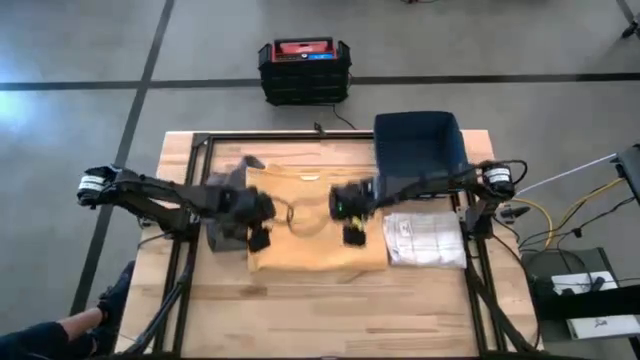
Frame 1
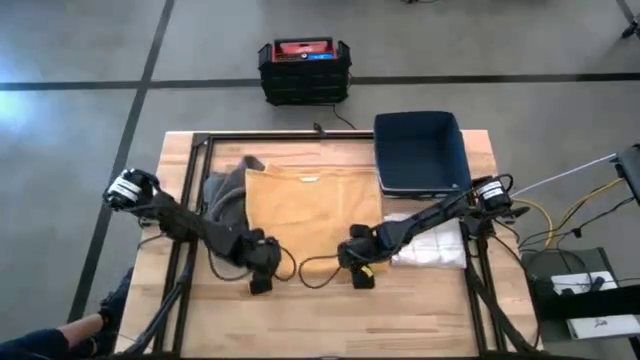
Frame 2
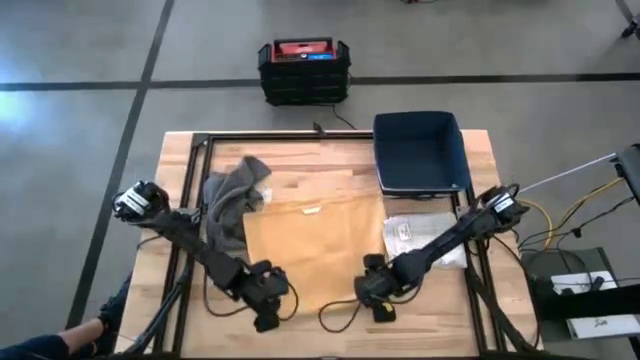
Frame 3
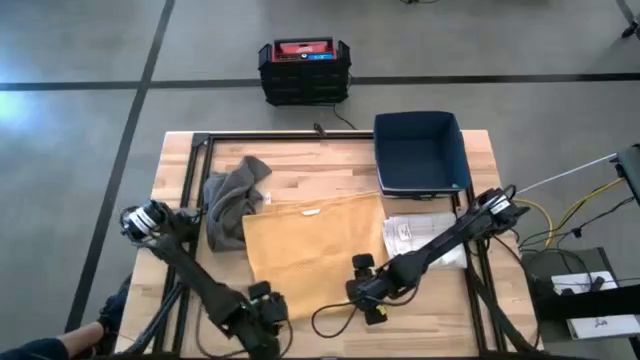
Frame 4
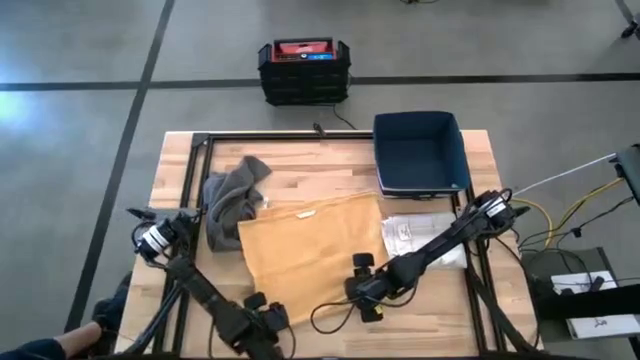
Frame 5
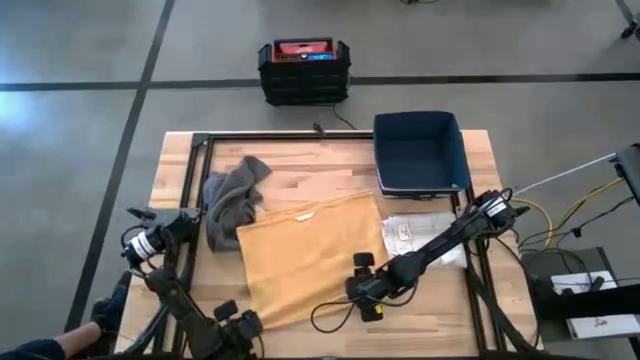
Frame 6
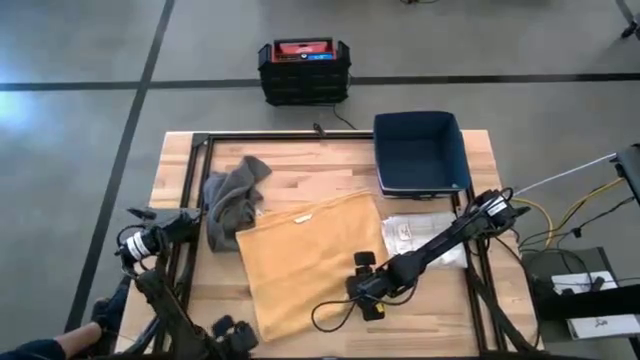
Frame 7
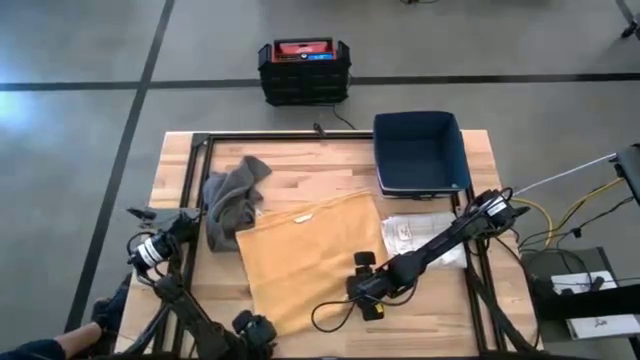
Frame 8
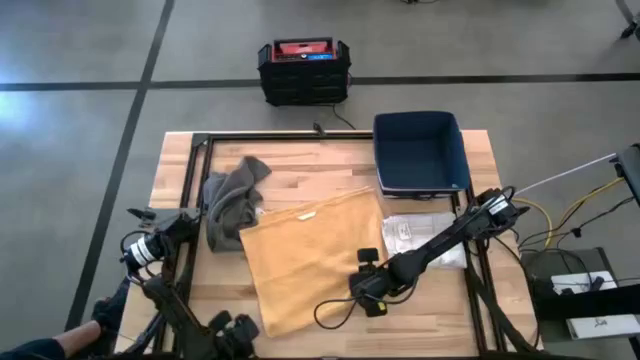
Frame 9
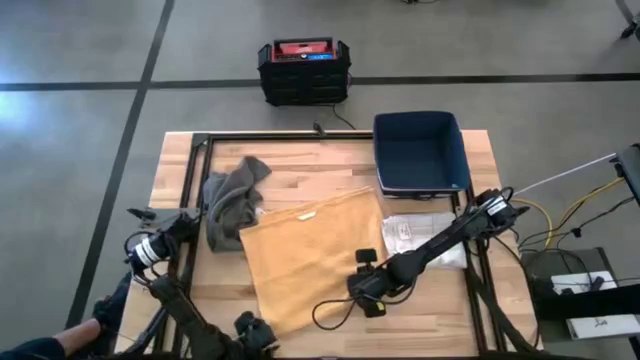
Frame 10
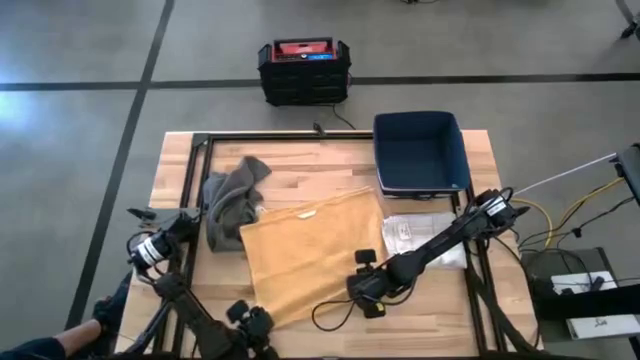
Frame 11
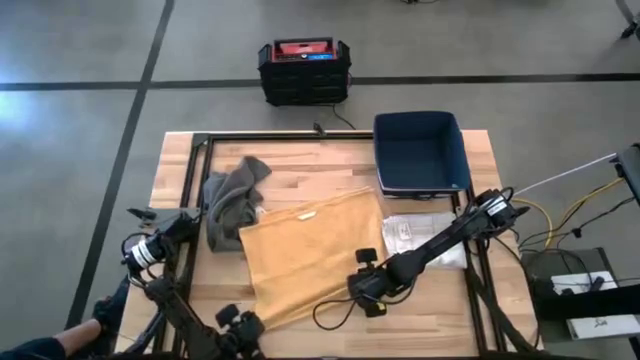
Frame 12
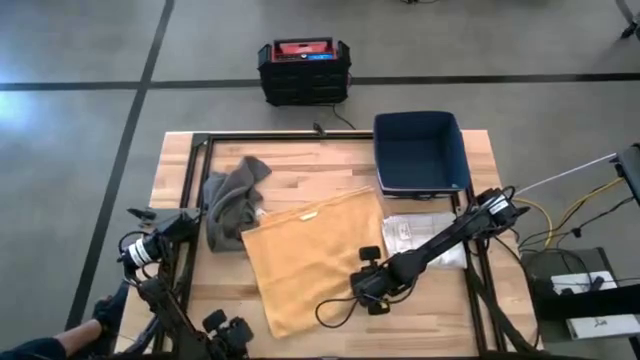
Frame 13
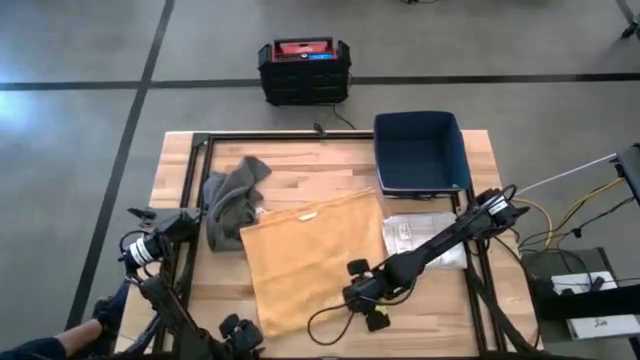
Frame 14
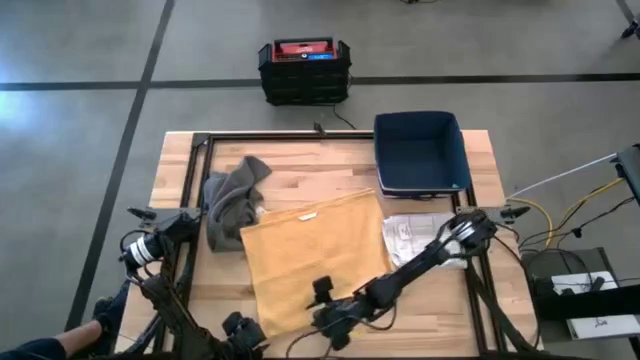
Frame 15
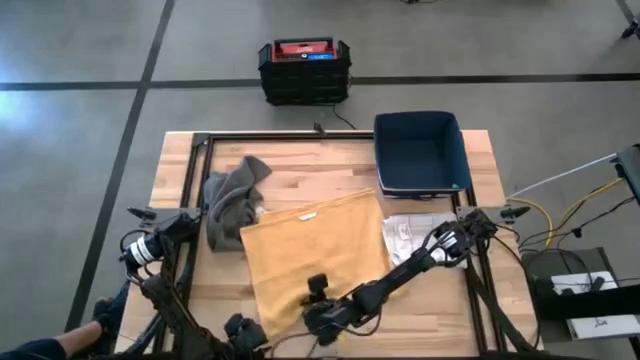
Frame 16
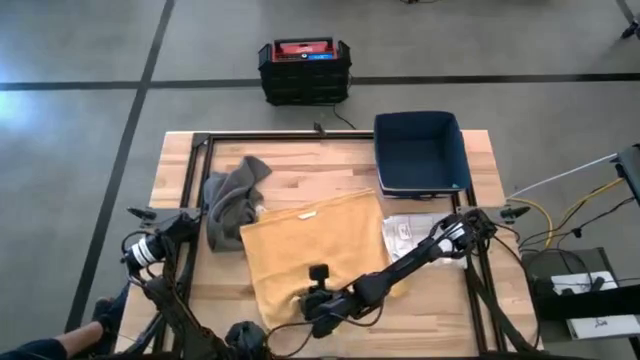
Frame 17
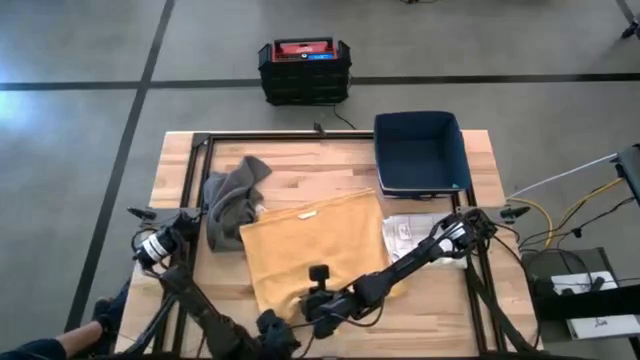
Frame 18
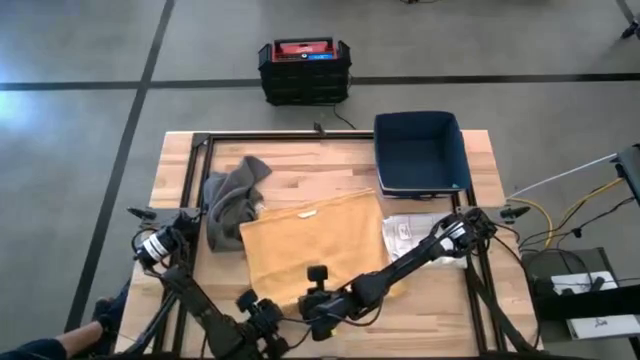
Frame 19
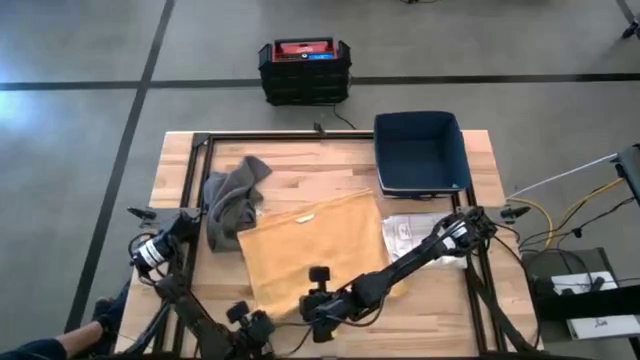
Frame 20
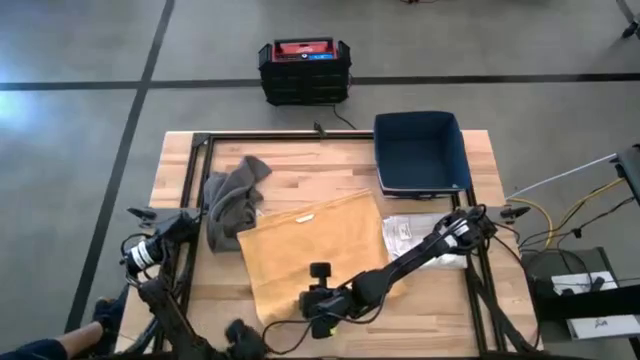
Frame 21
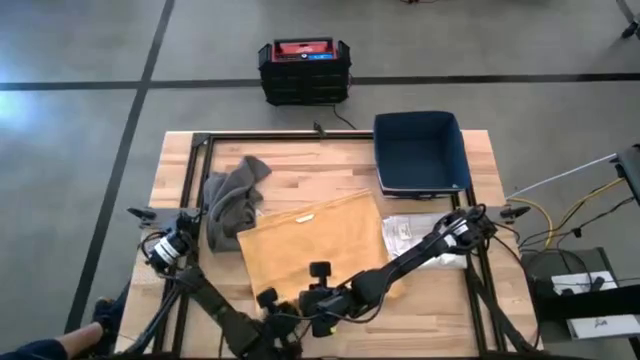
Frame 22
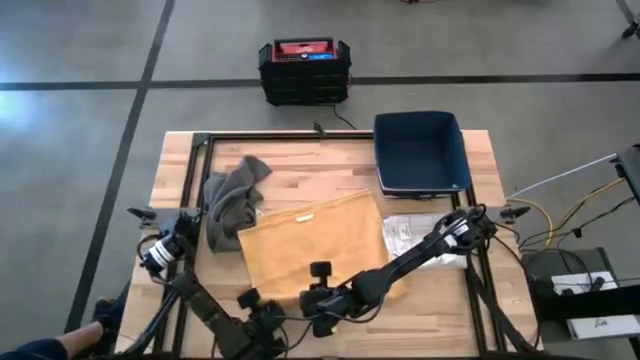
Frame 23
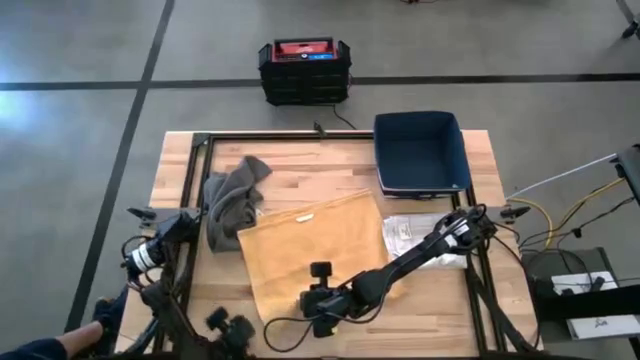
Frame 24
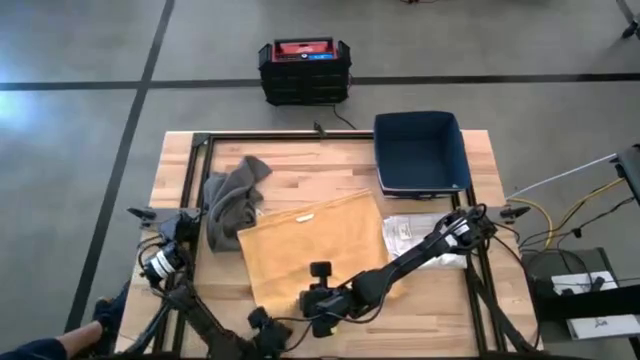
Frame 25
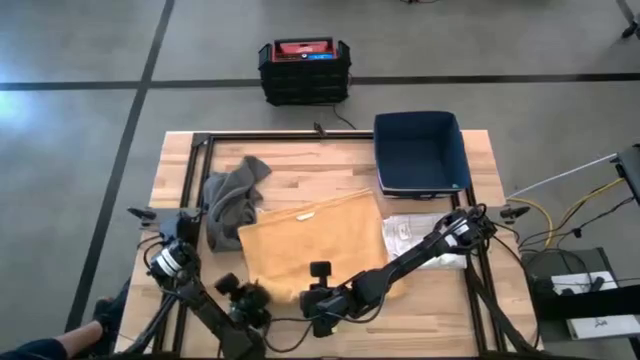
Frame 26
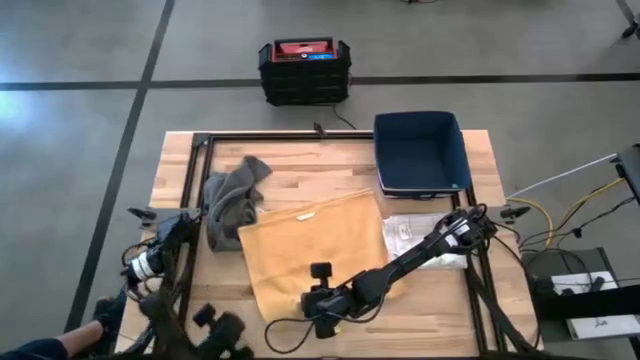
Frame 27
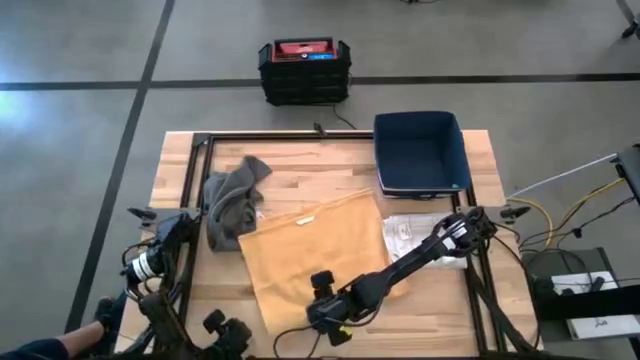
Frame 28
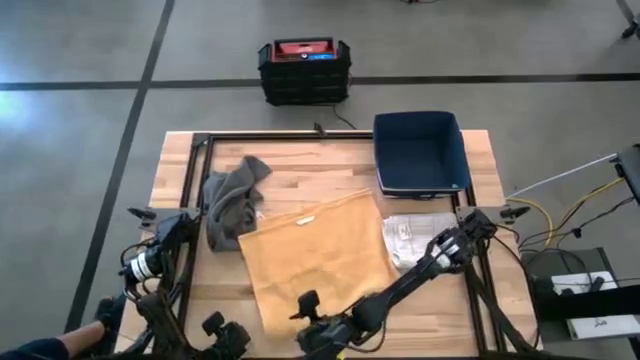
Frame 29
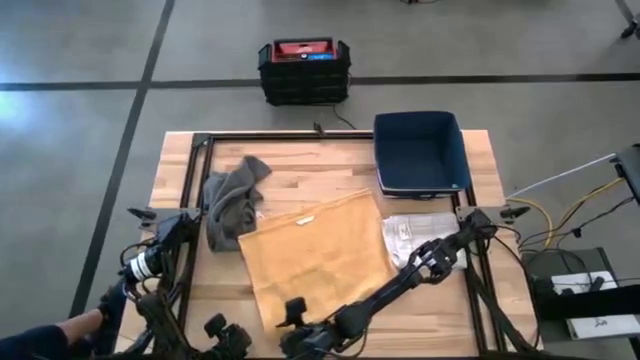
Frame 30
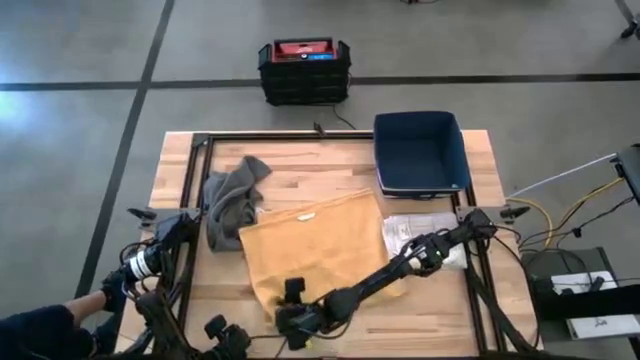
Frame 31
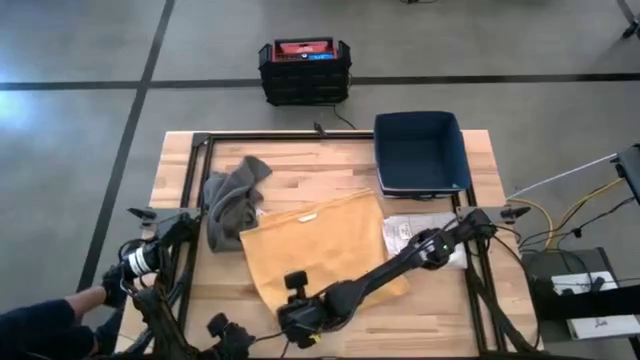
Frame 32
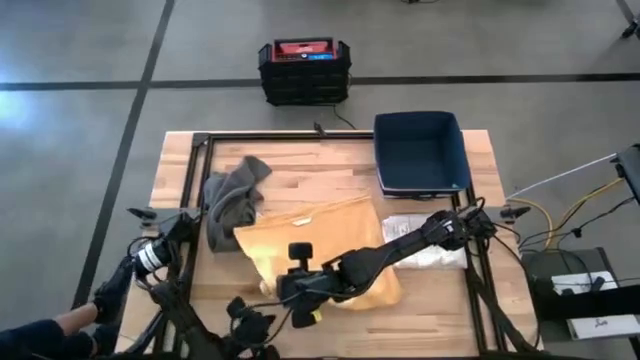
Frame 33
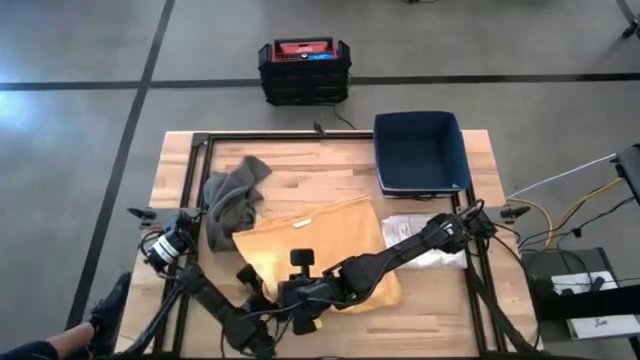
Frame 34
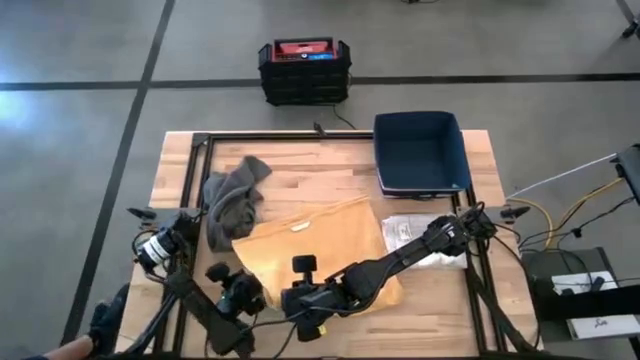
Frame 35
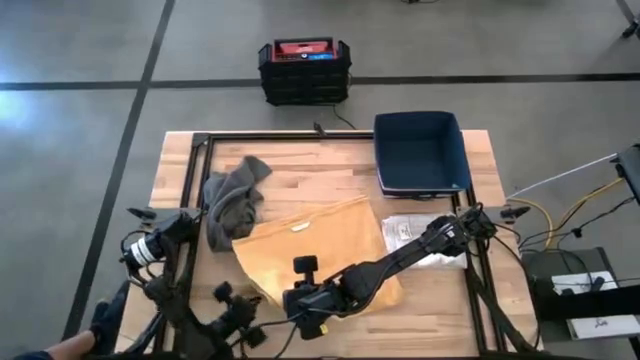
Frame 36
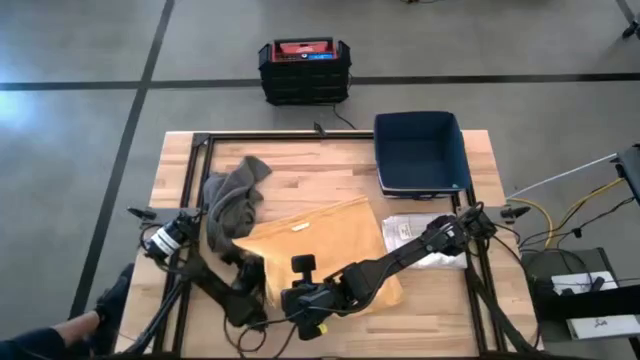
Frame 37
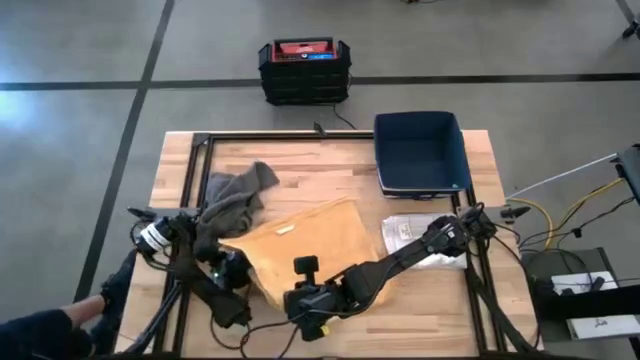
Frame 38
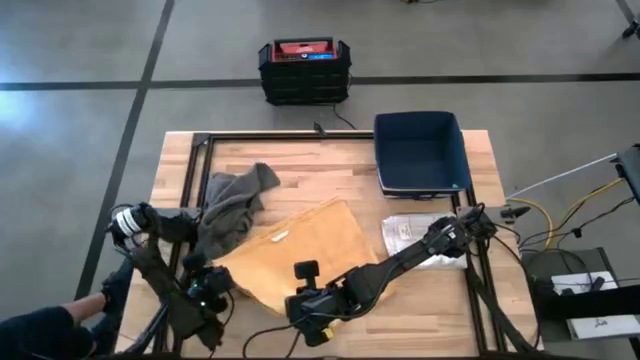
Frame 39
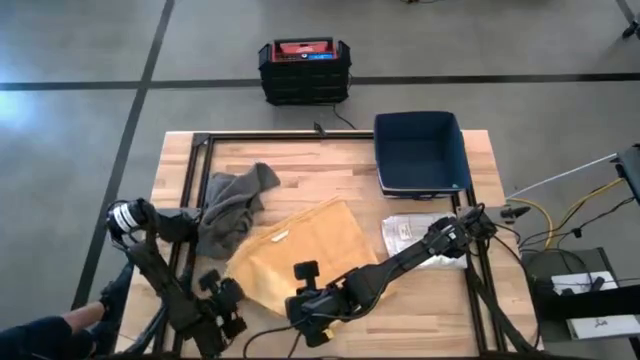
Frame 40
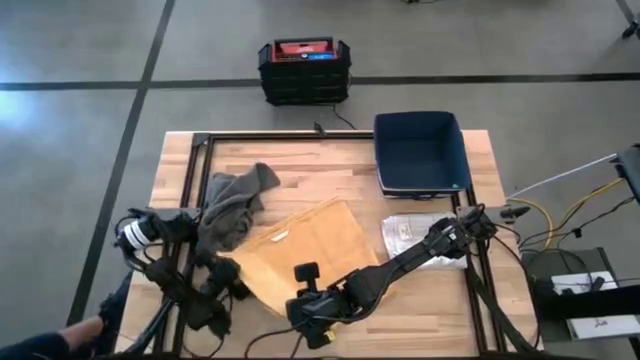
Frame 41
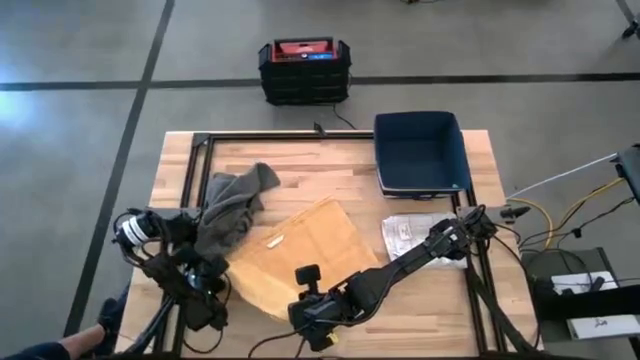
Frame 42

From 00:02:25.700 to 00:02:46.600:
Task: Fold towel
Fold the yellow towel
